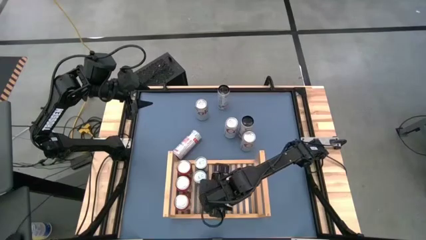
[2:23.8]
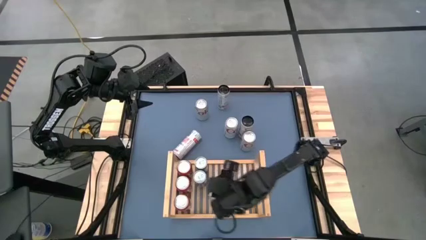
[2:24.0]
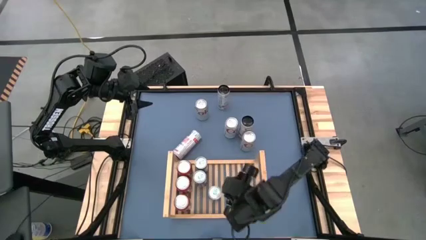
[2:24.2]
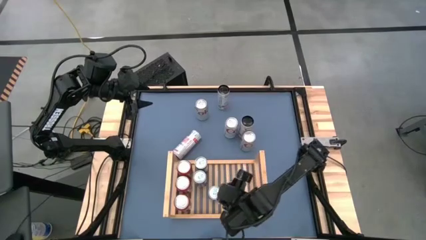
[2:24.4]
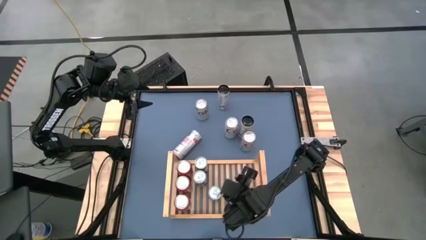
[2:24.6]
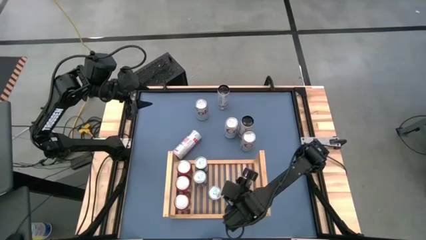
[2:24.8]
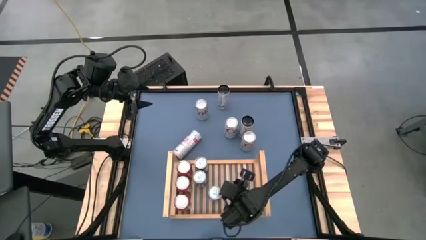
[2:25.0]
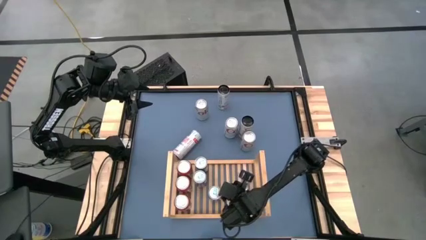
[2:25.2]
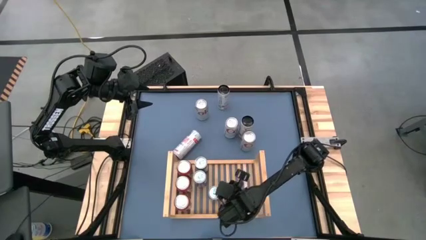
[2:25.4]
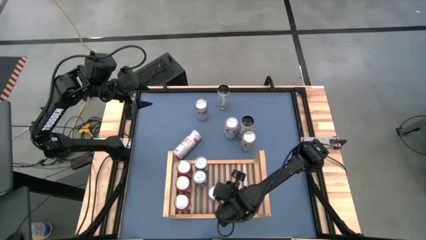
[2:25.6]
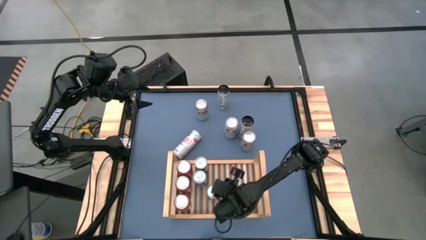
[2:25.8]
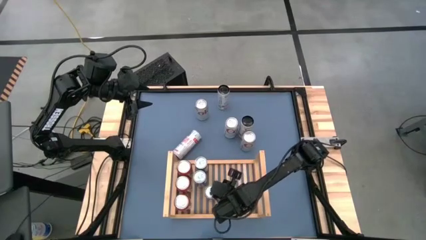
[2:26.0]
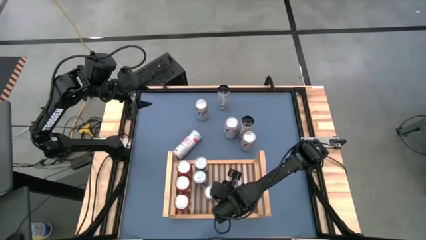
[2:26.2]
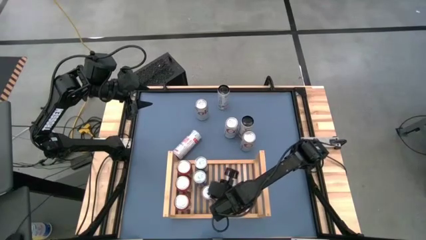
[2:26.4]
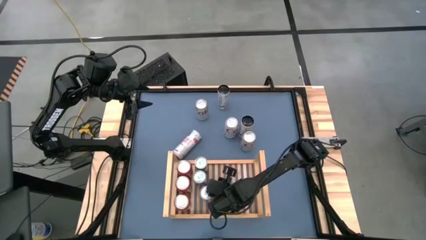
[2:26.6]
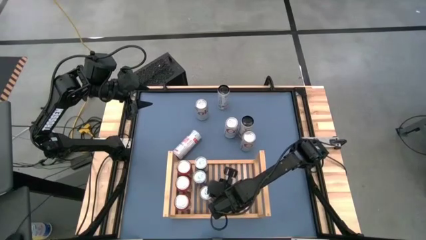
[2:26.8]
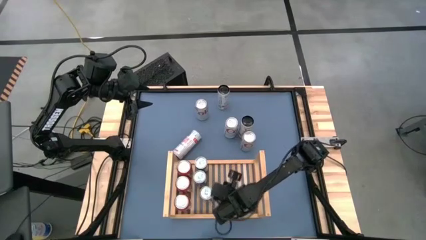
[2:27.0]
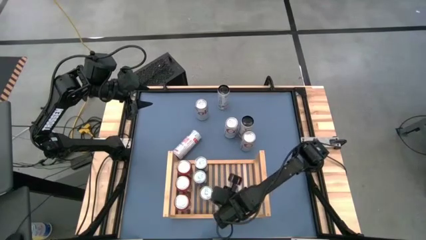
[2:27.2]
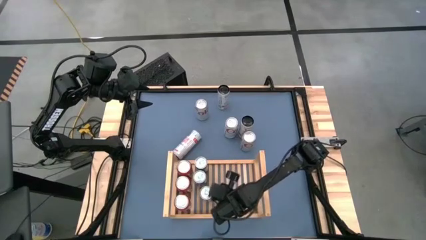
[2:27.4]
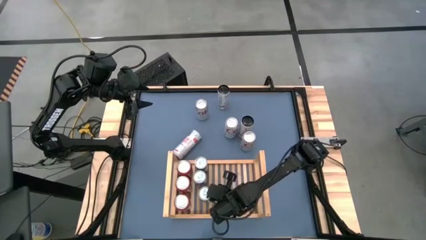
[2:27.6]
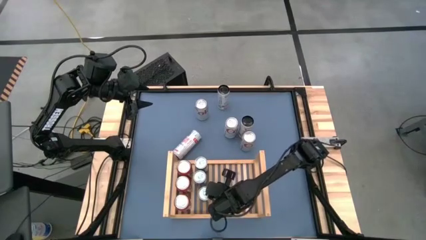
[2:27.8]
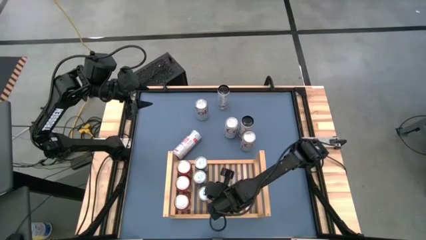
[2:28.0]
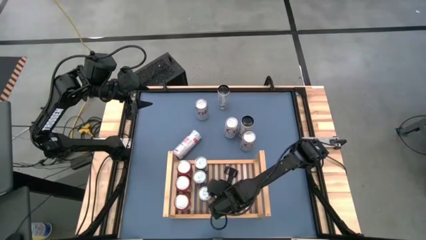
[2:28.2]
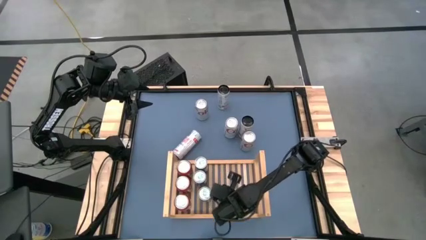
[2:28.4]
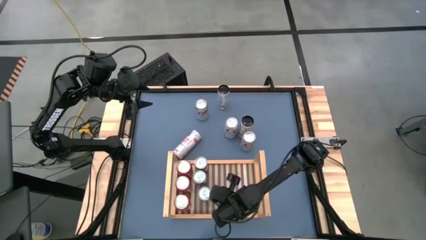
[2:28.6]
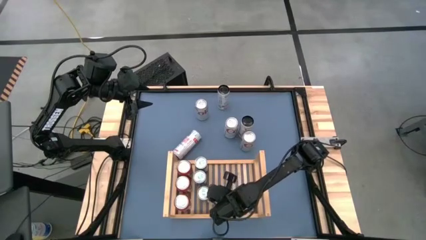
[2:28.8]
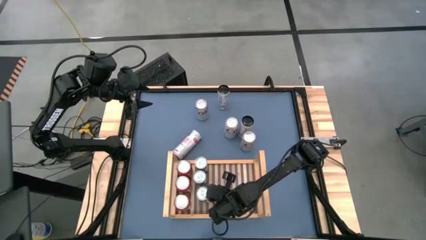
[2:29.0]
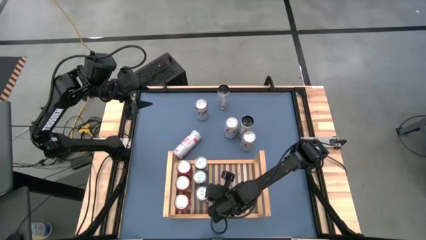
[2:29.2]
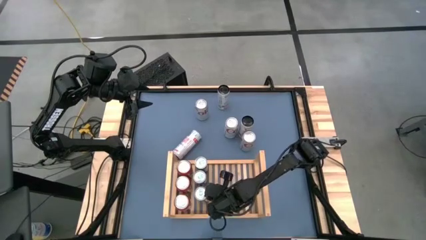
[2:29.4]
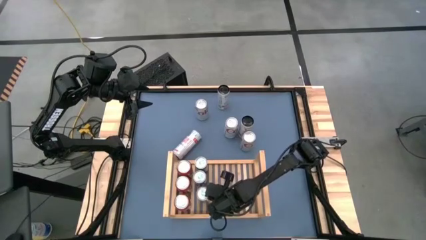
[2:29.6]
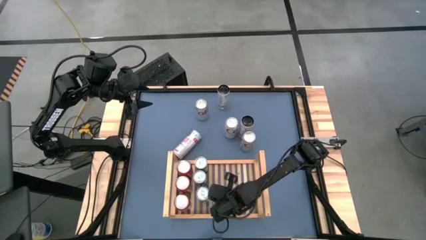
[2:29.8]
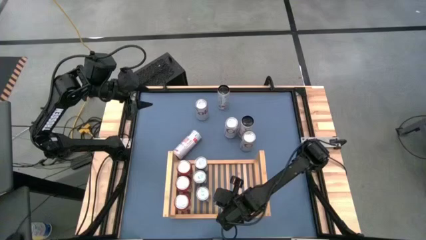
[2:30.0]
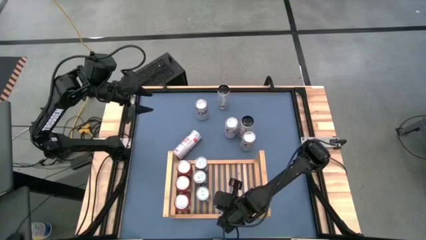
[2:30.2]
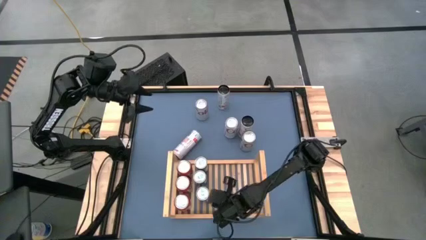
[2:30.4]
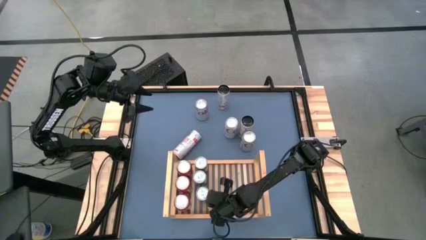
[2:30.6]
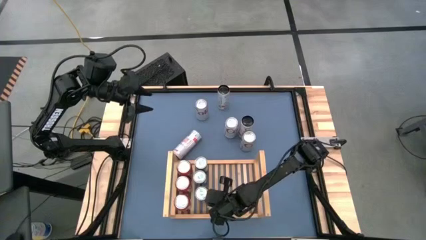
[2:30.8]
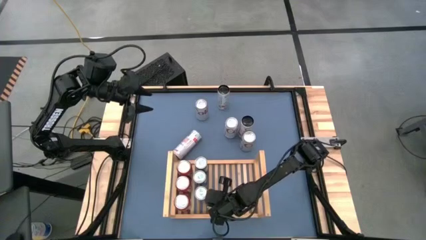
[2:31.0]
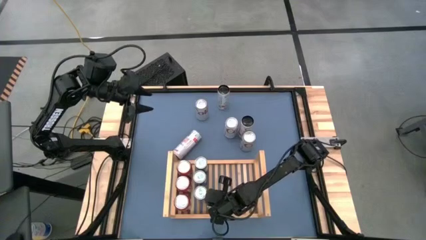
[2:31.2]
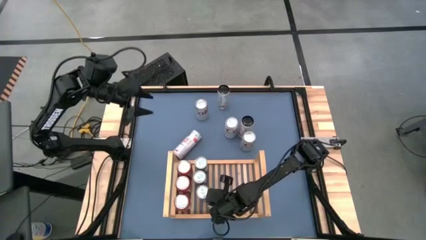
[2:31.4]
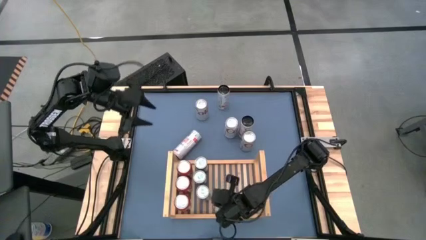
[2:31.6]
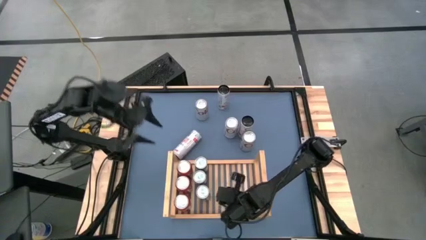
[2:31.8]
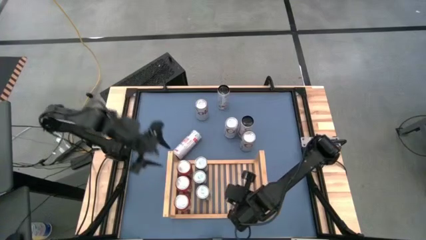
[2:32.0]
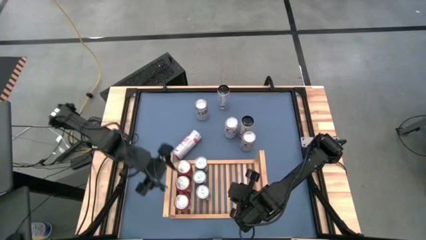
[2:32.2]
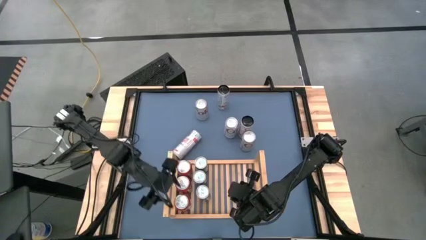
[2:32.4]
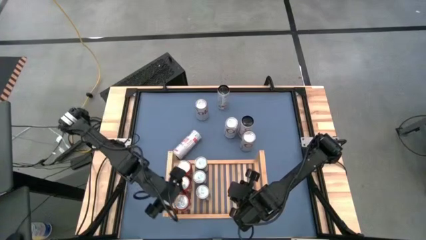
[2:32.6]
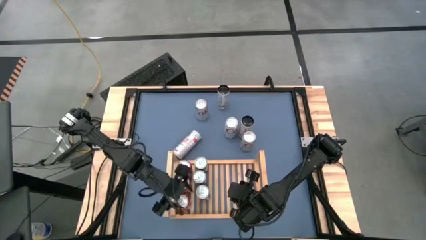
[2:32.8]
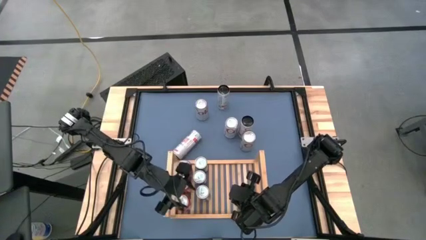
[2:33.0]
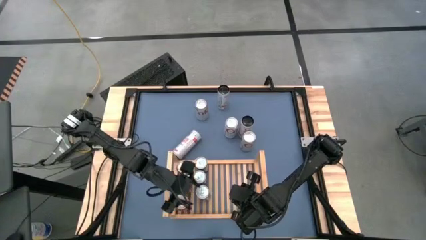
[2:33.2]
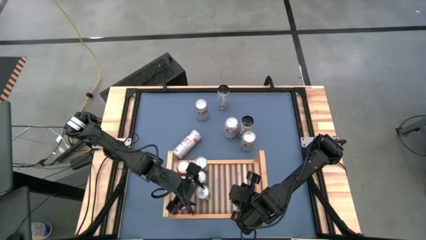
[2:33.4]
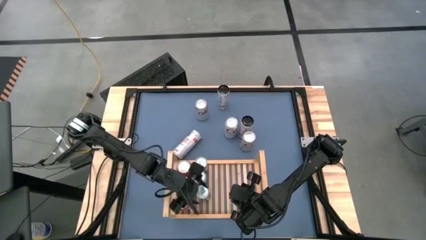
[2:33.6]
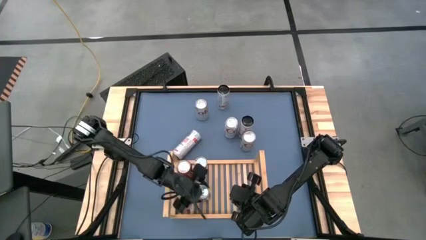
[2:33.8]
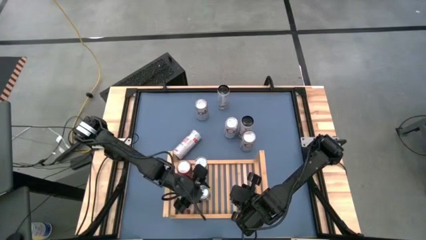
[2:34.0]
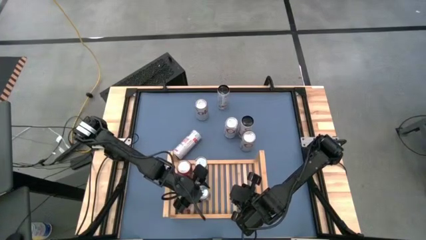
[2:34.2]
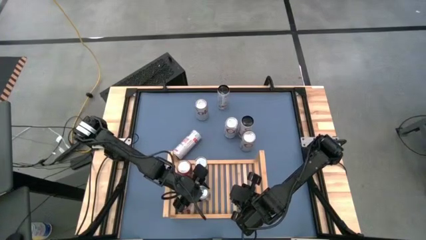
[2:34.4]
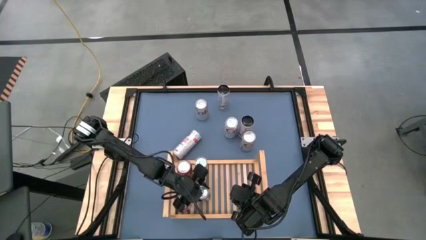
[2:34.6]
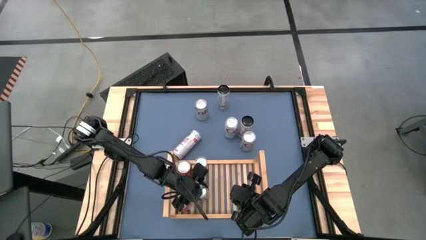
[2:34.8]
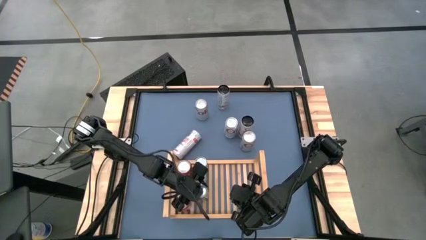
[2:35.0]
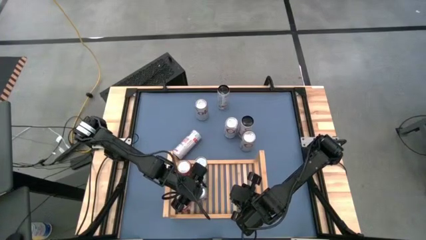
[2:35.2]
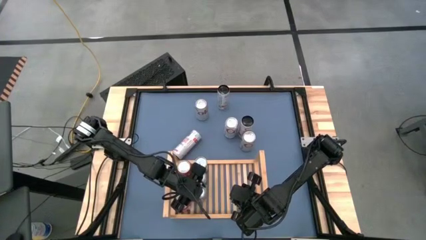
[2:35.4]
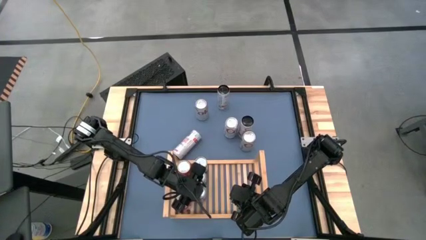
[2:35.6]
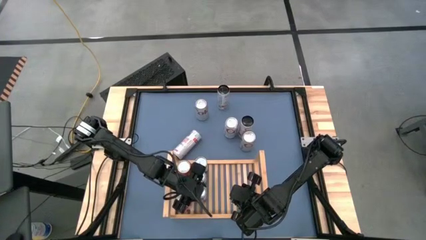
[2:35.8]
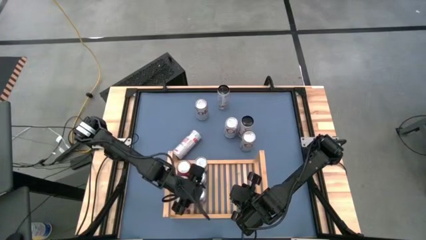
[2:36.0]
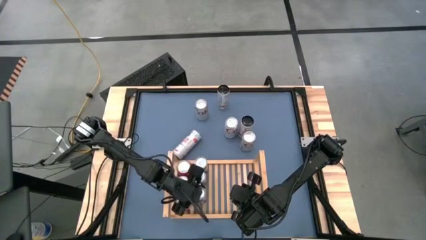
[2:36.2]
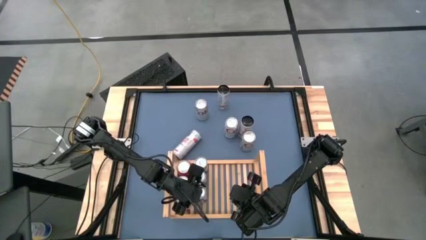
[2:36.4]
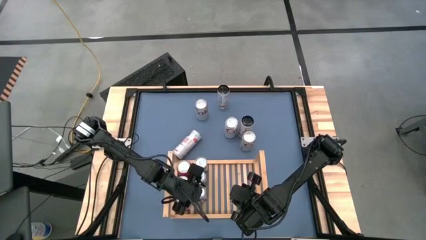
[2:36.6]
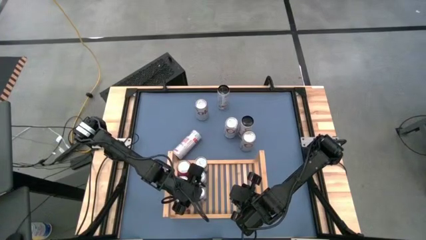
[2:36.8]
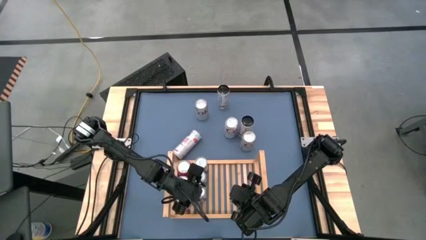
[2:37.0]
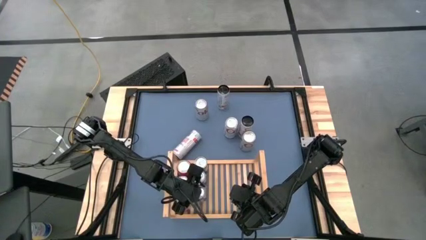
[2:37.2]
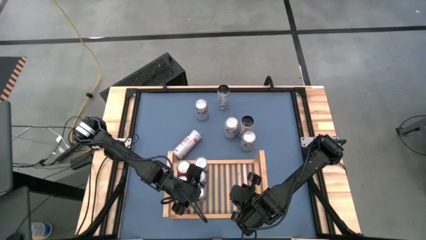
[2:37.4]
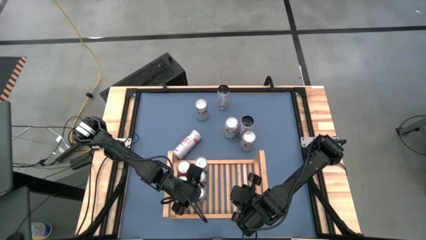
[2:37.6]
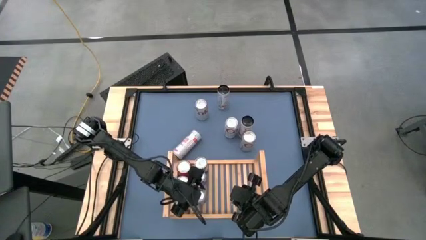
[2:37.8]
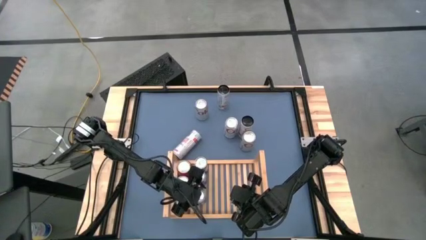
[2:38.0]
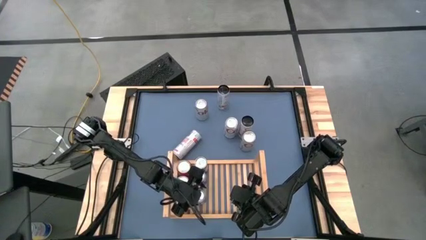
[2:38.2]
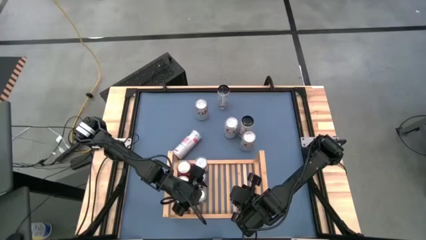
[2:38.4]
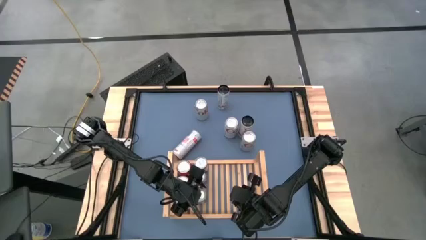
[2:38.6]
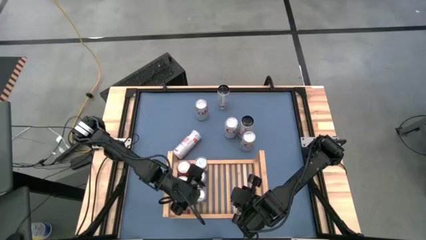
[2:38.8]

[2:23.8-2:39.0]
Task: Place canned beverage on shelf
Adjust the blue soda can on the shelf
